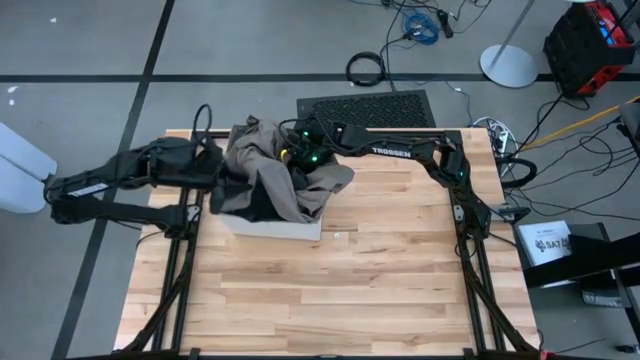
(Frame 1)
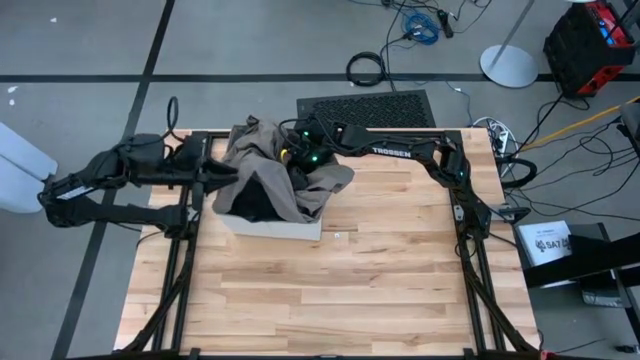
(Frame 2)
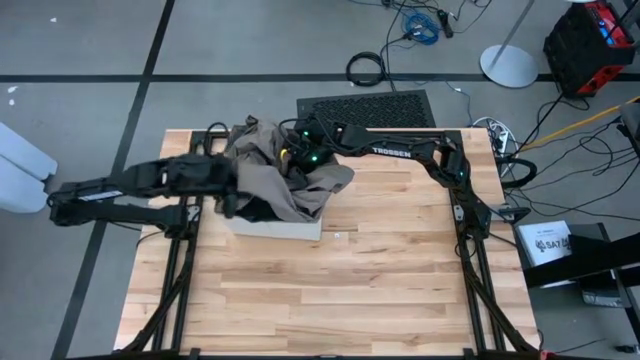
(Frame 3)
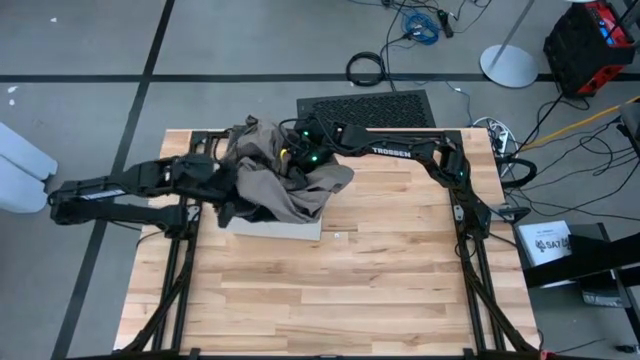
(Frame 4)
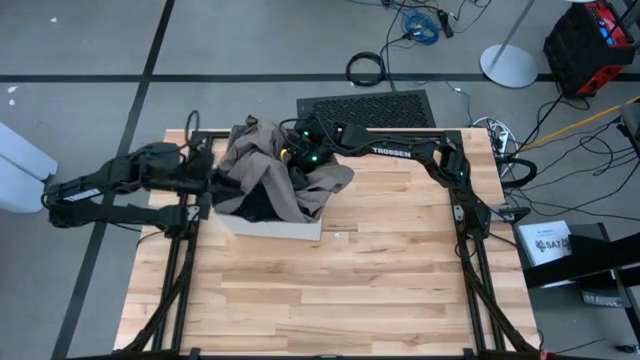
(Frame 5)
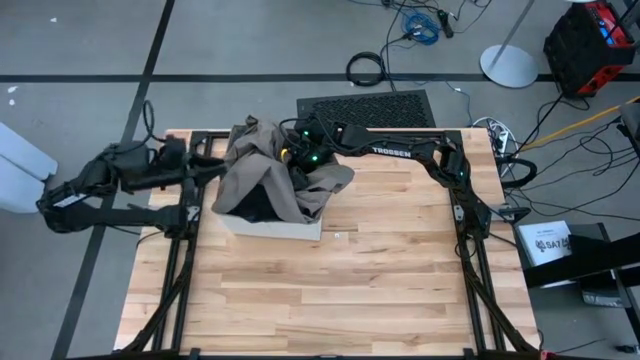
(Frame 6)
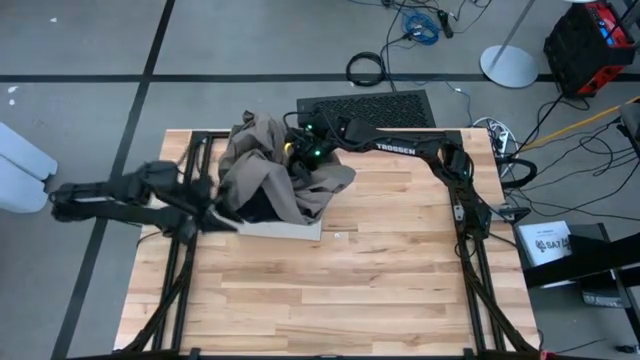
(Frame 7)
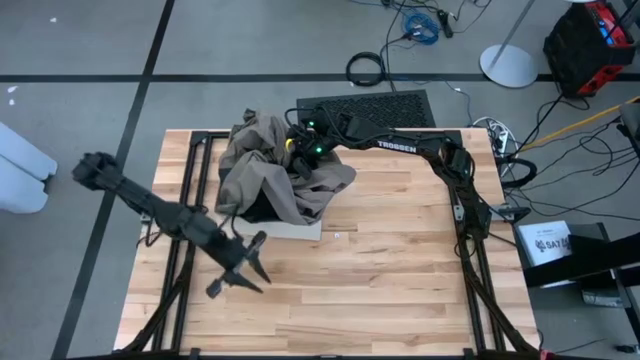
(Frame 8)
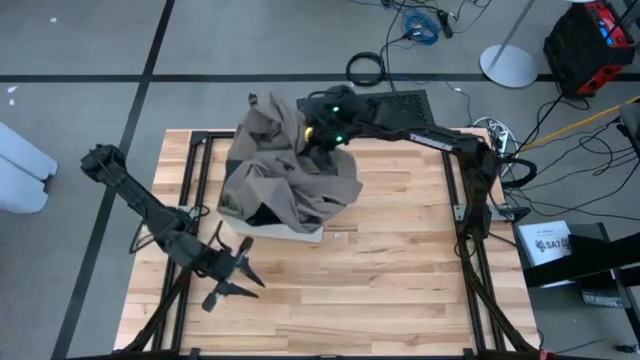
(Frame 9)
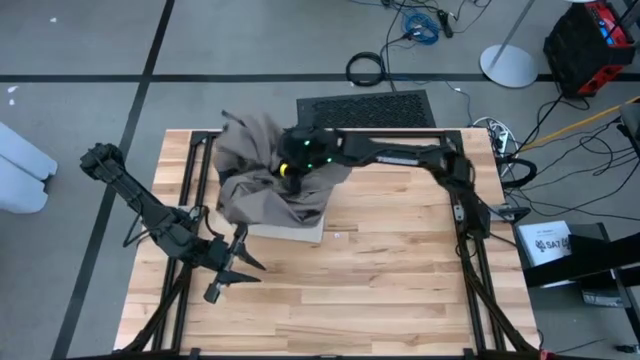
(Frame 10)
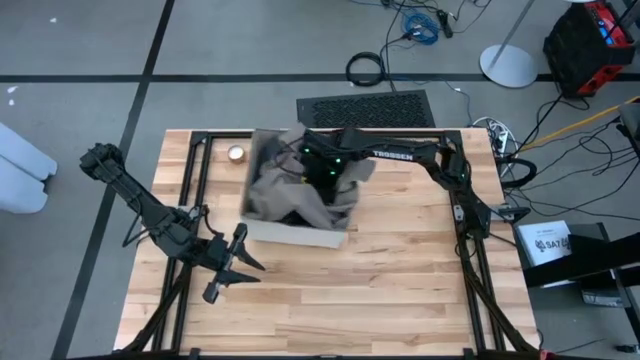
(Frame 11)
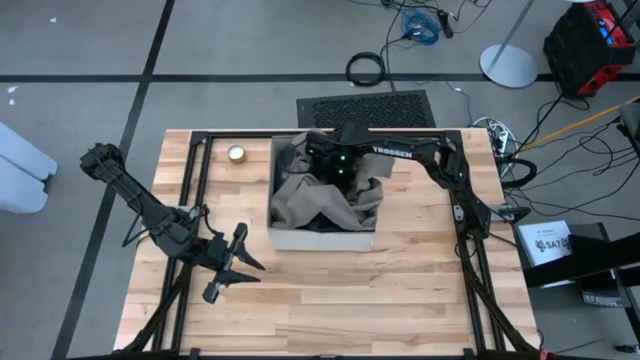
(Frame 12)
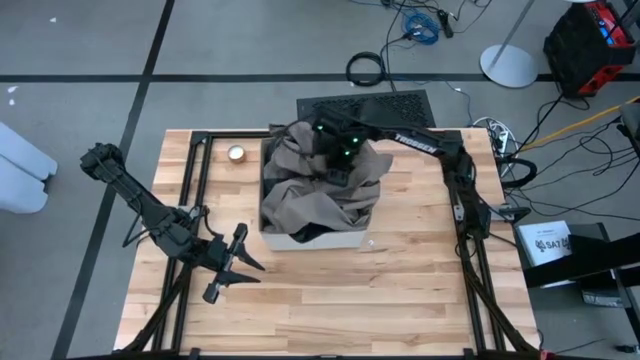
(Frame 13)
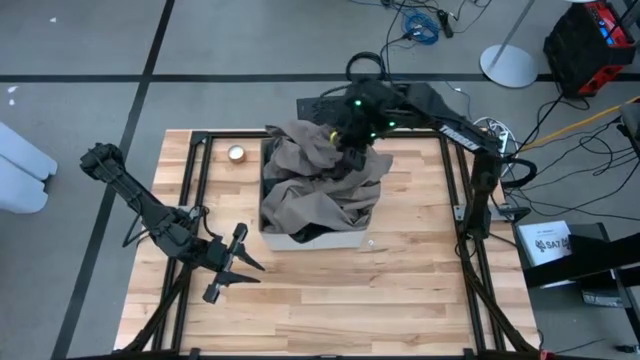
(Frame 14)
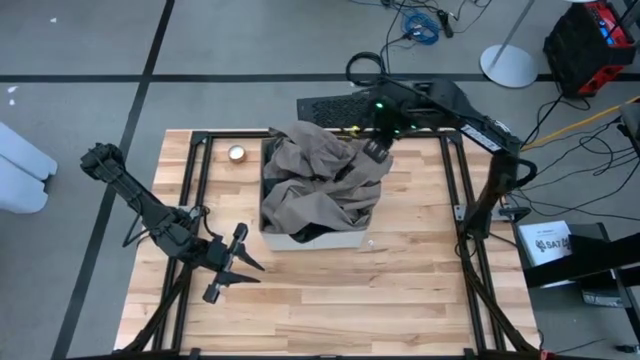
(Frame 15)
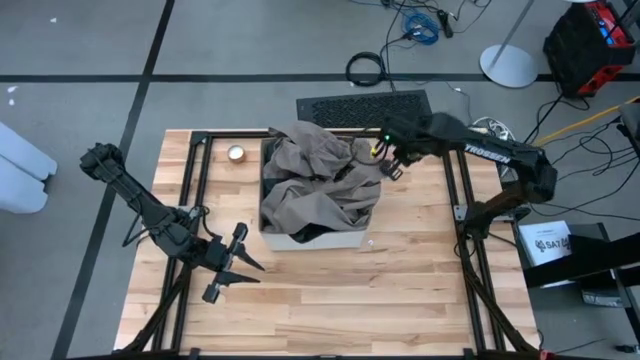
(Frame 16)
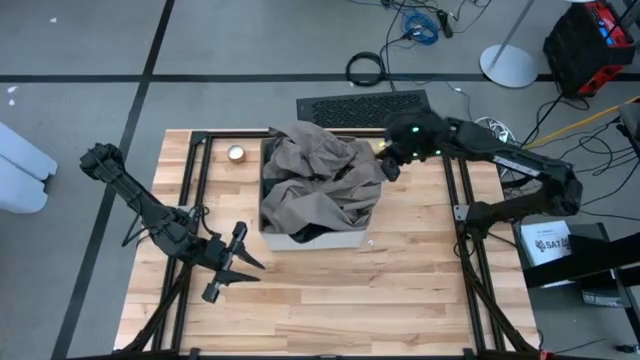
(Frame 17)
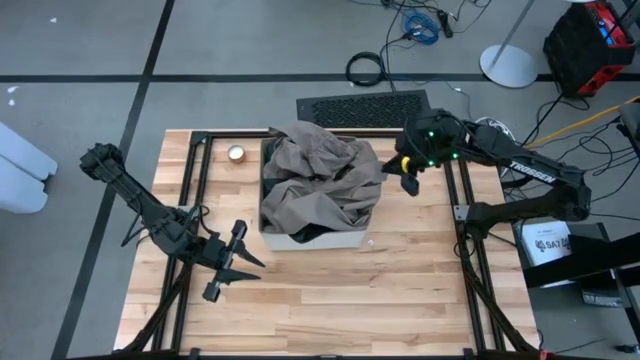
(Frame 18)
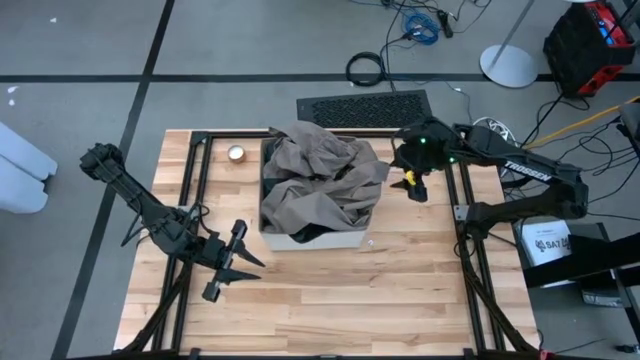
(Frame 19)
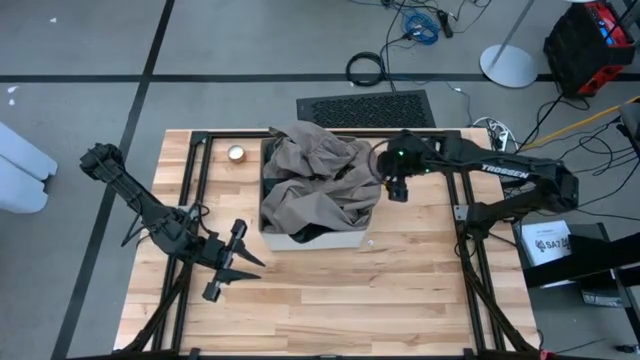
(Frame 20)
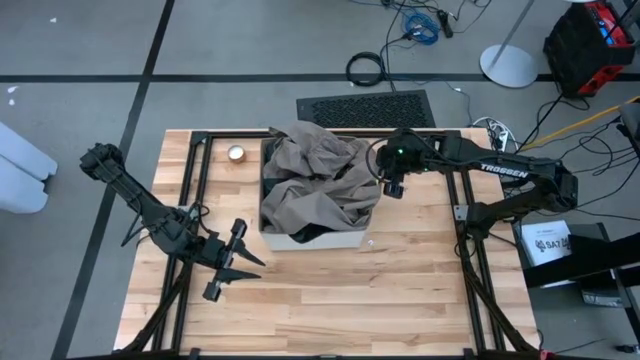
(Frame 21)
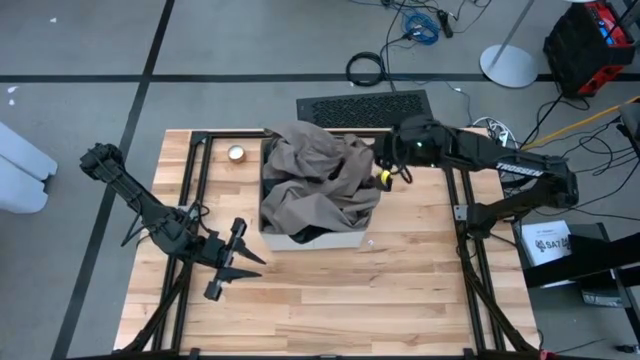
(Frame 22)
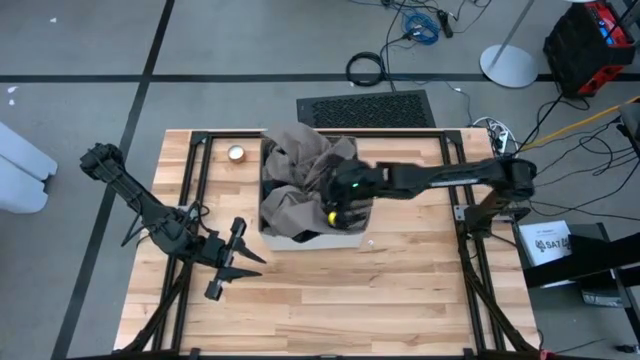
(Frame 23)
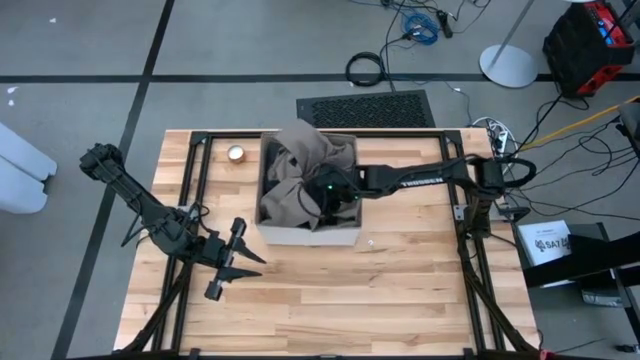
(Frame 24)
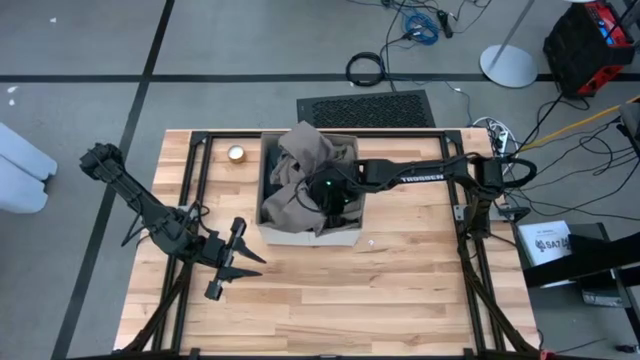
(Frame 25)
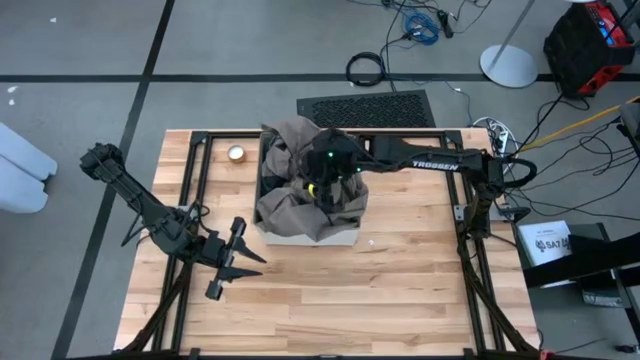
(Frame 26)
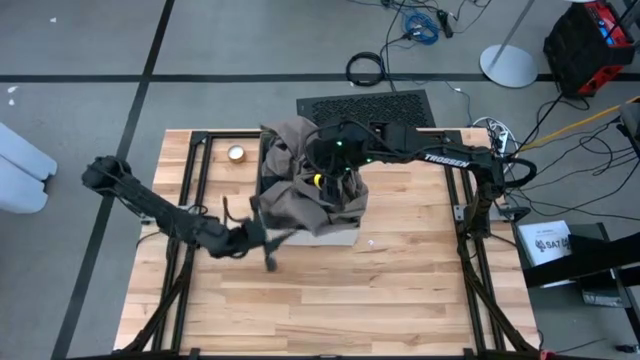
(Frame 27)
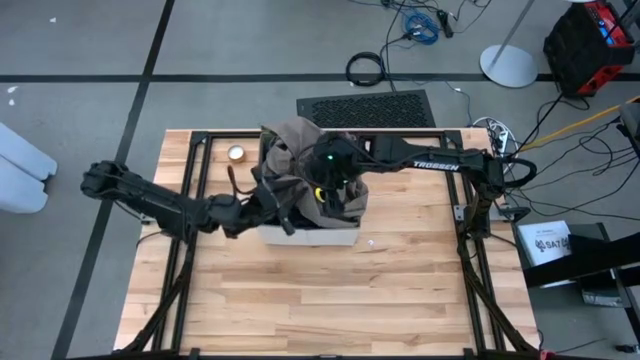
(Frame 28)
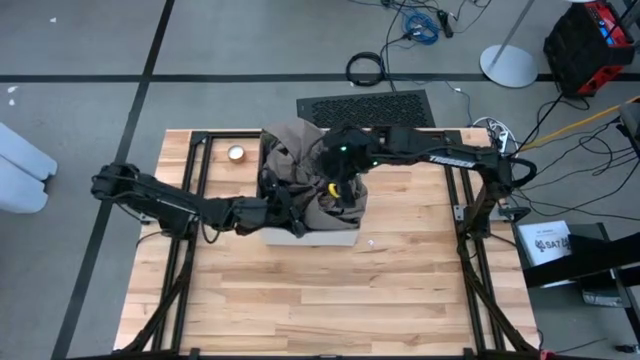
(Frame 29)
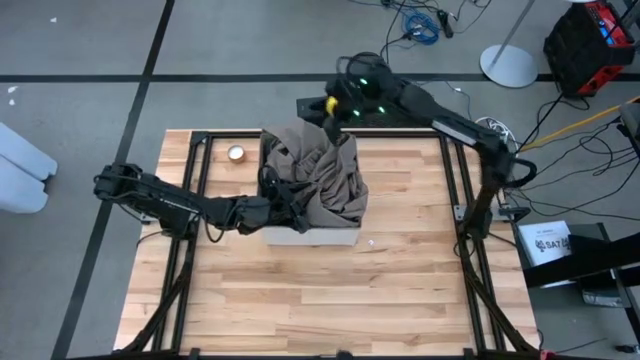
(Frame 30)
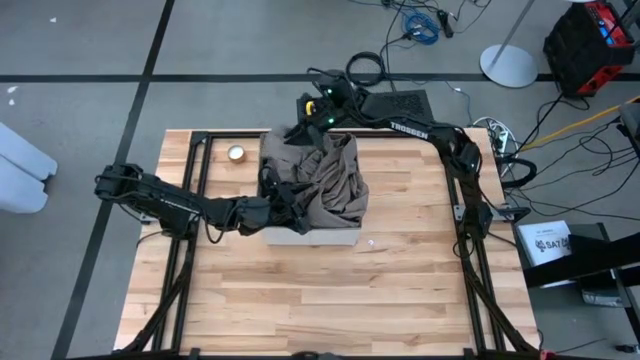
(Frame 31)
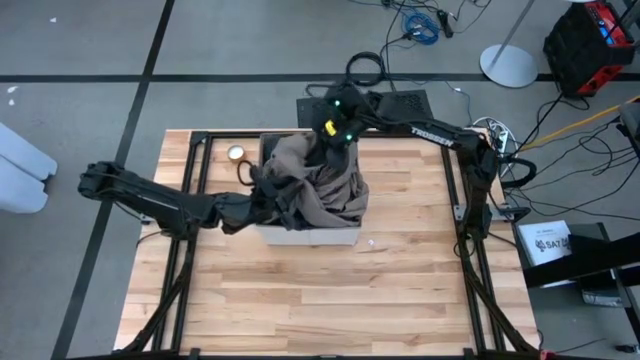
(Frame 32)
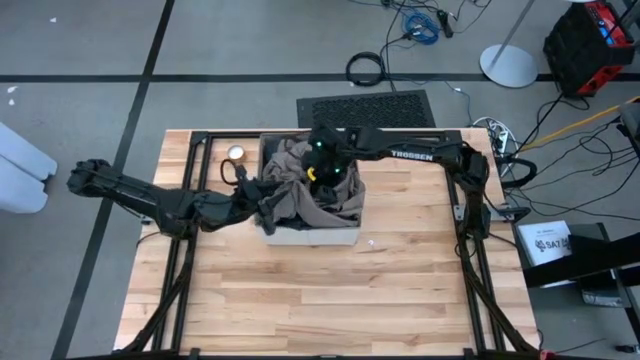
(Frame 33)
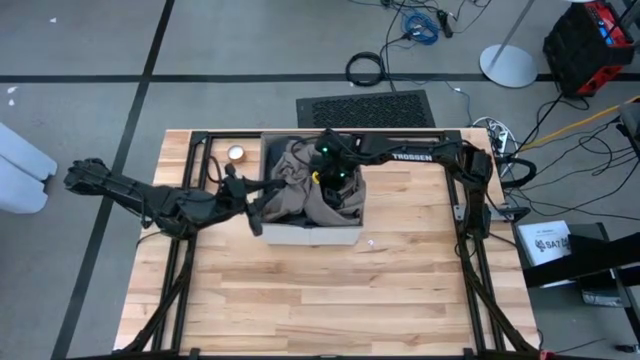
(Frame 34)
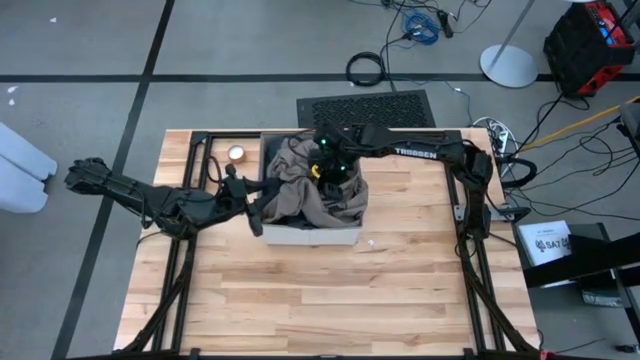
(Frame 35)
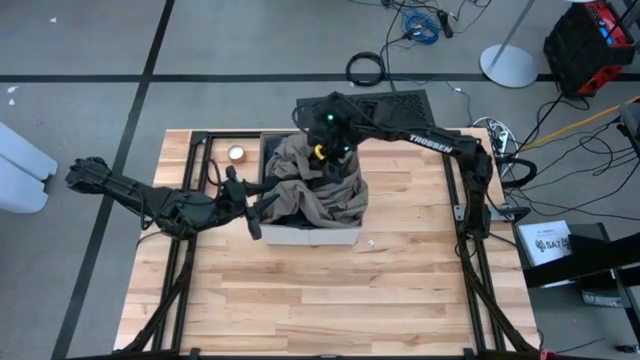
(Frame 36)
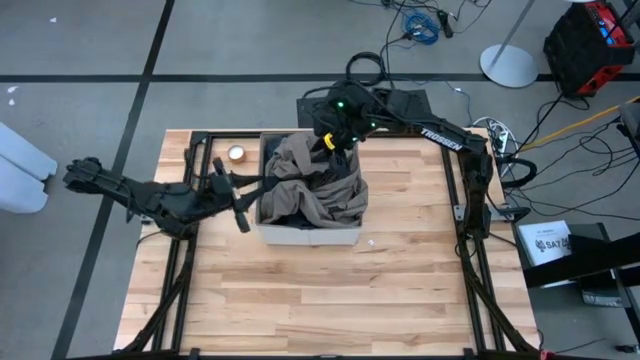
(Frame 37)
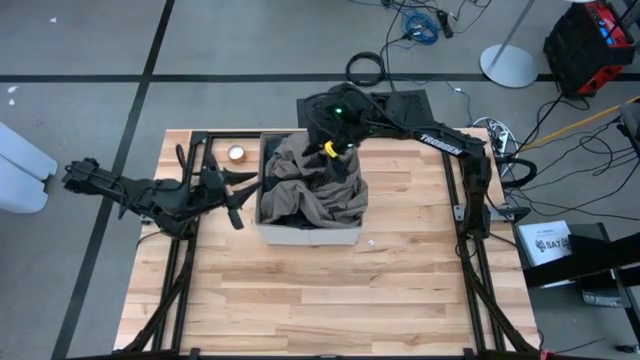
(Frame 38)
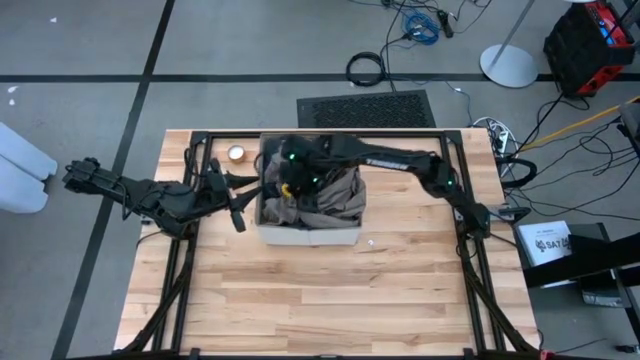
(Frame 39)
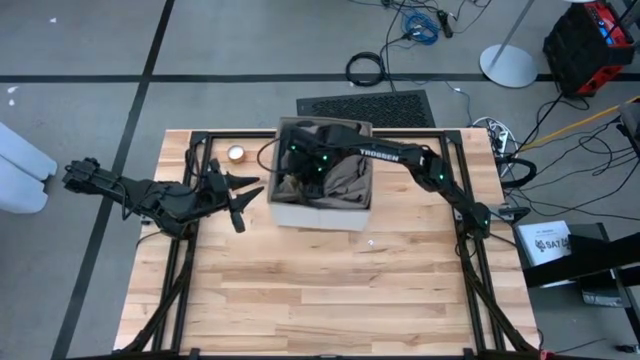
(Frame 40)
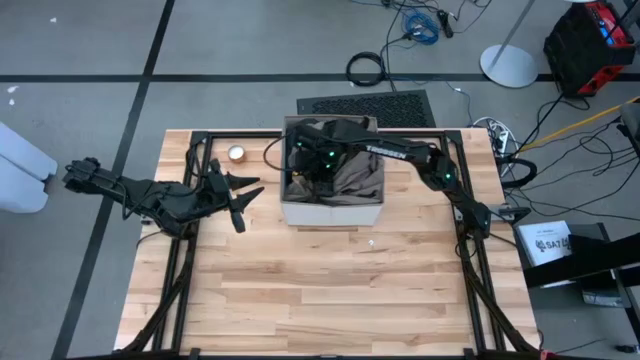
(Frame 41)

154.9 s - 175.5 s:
Task: Sort clothes
Put the brown jacket into the white laundry bin
